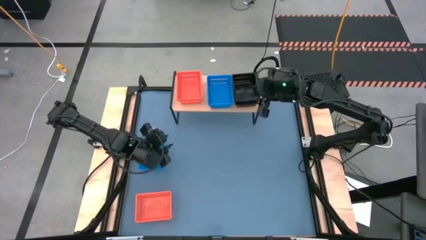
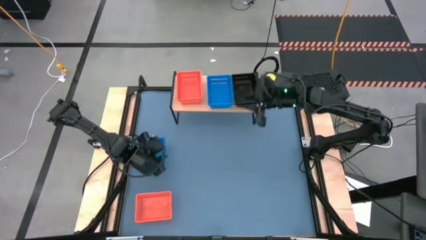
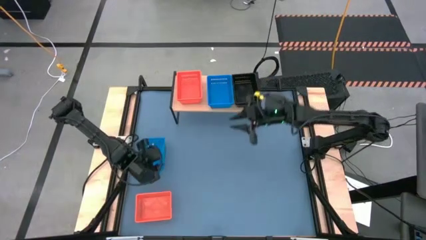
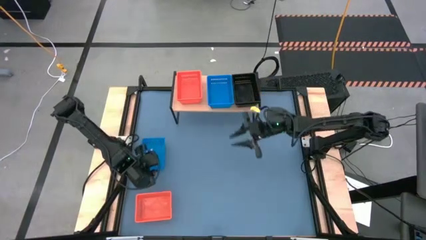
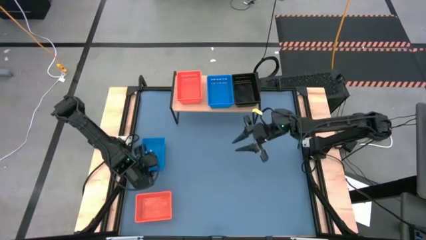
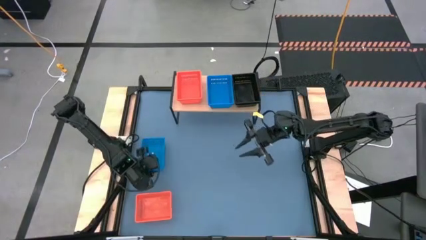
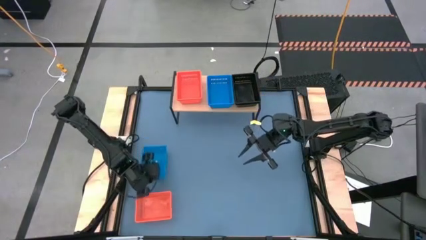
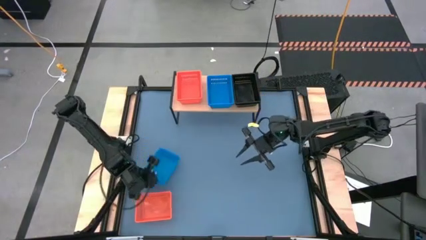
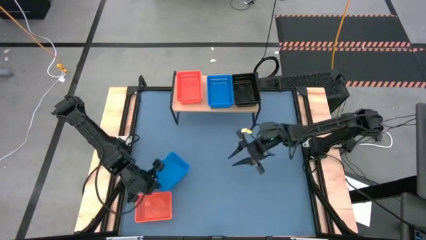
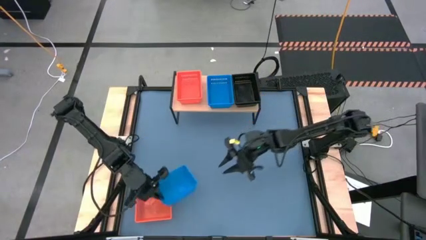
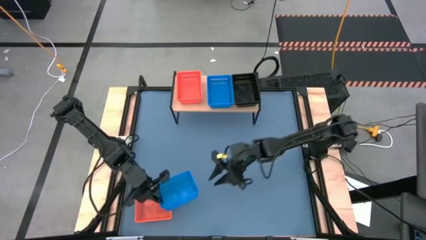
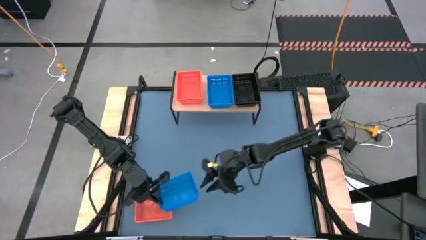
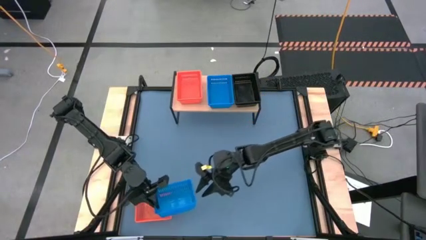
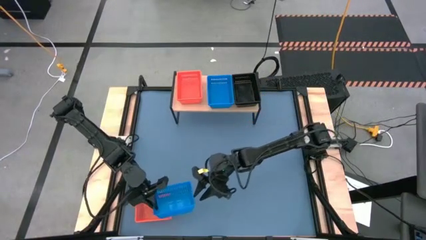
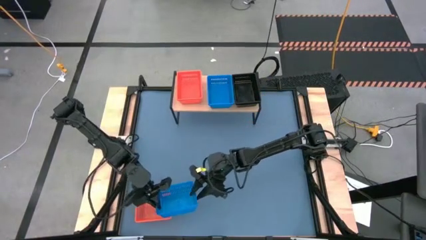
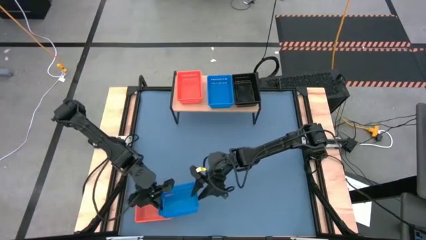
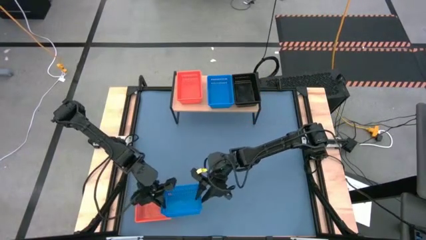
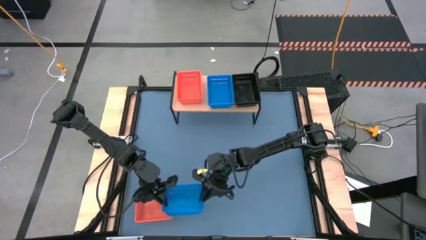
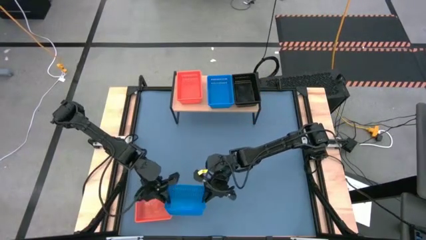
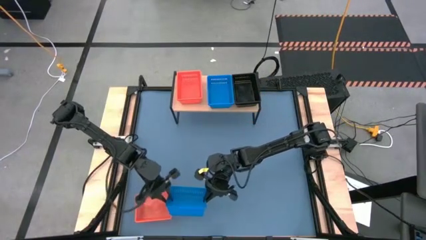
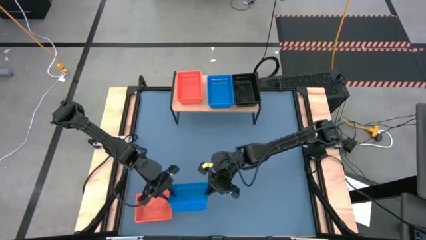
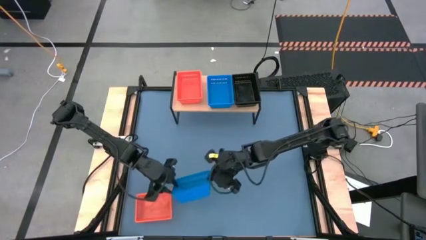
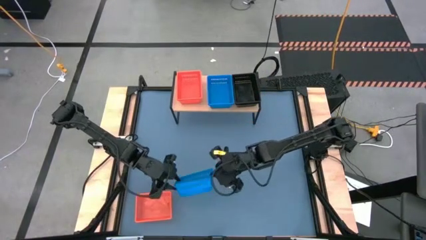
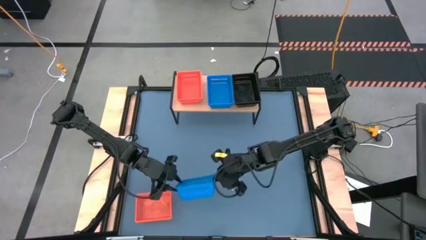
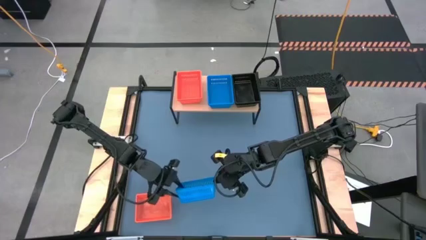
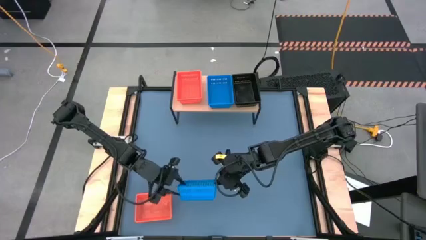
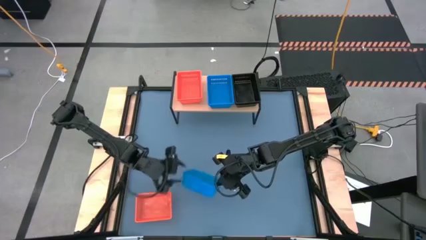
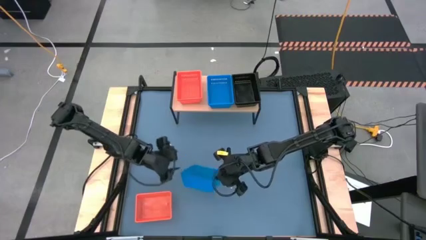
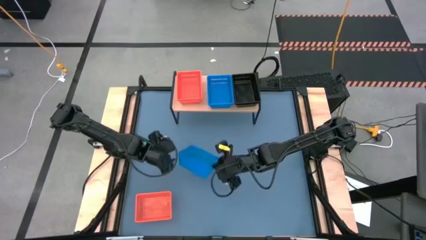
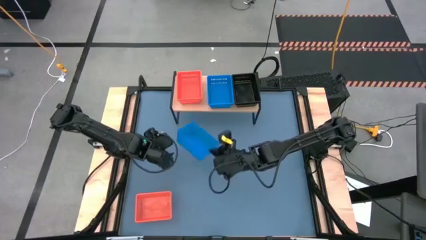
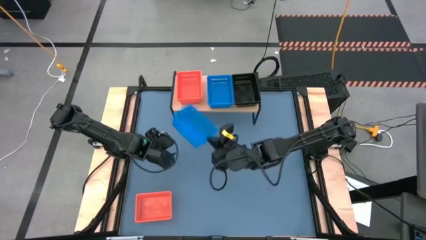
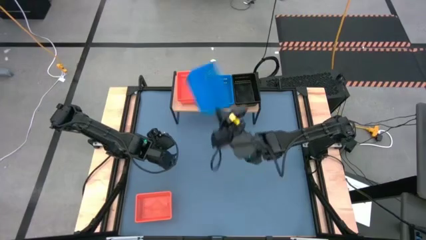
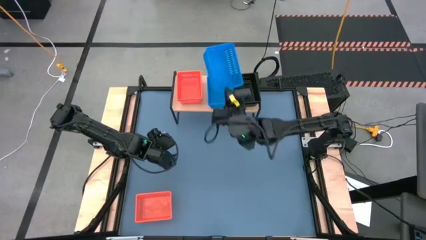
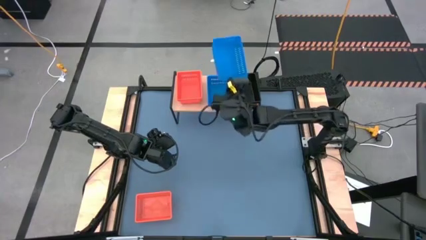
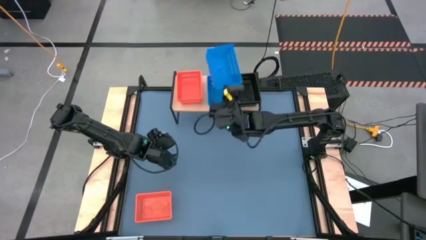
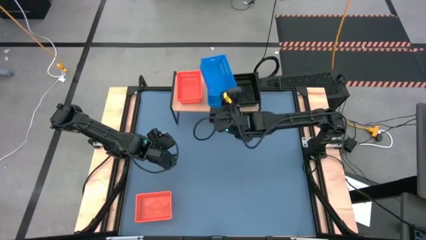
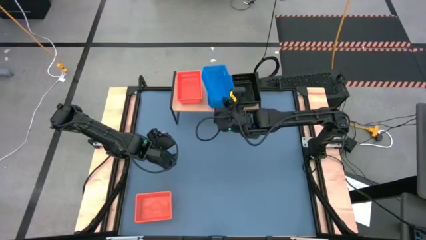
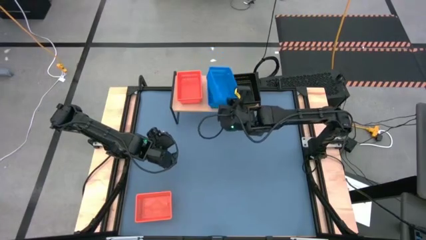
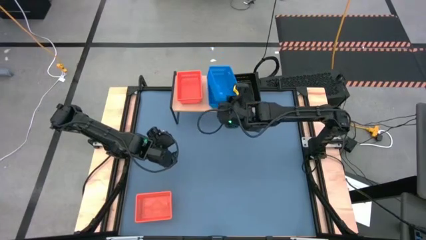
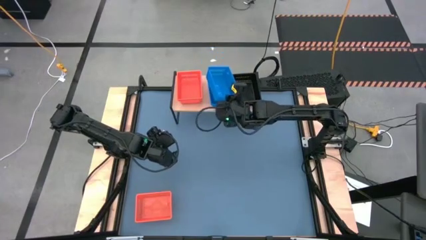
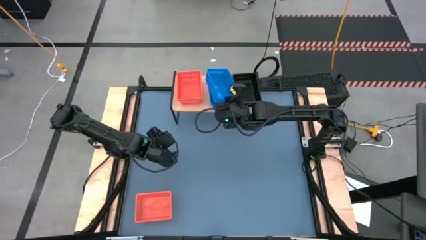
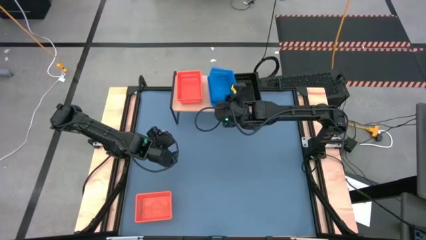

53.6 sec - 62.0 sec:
Task: Stack baskets on shelf by color
Stack the blue basket on top of the blue basket on the shelf

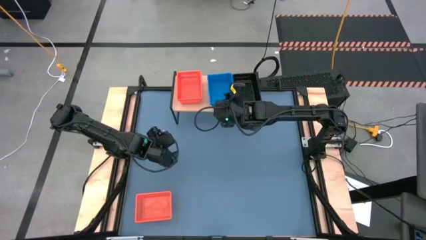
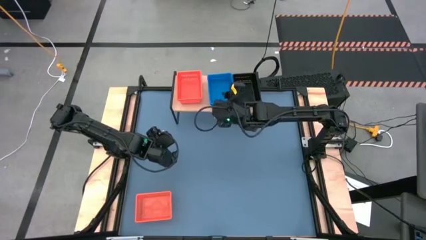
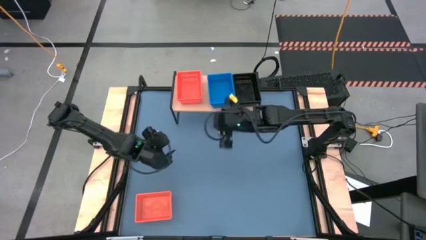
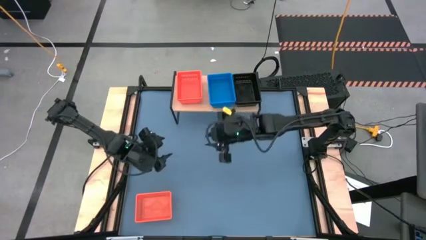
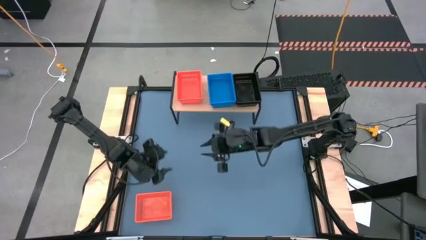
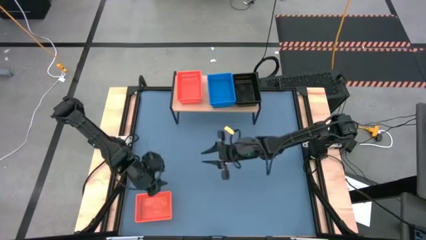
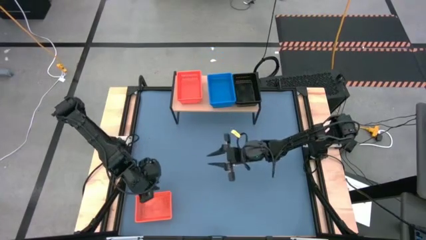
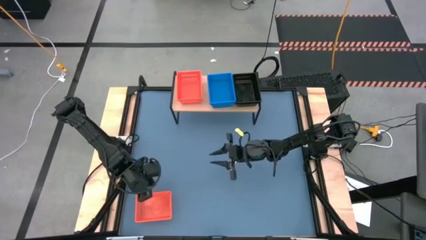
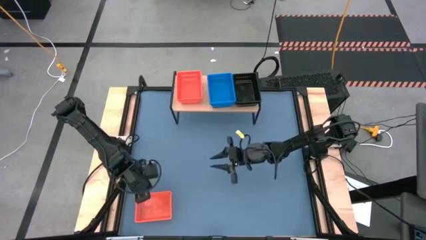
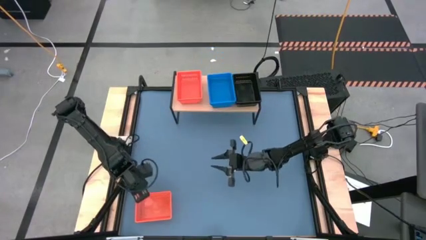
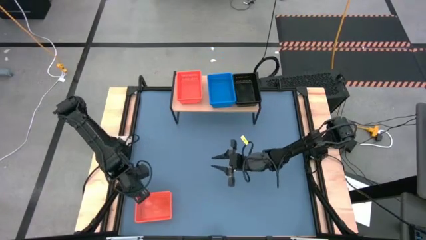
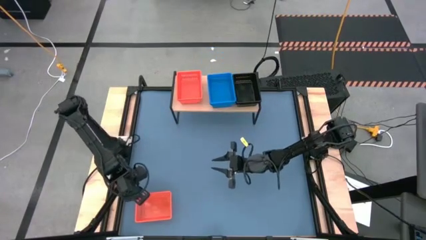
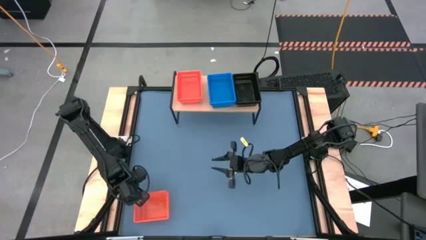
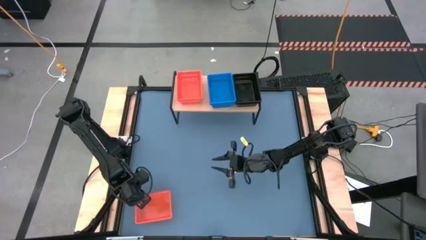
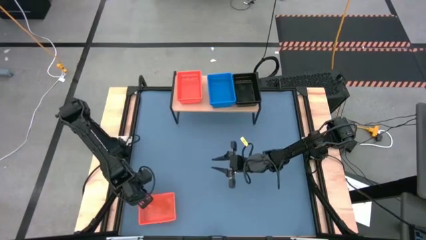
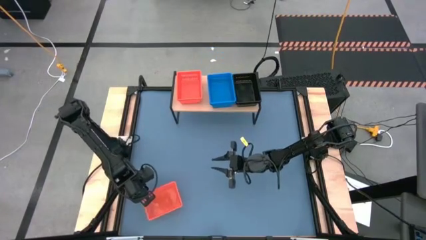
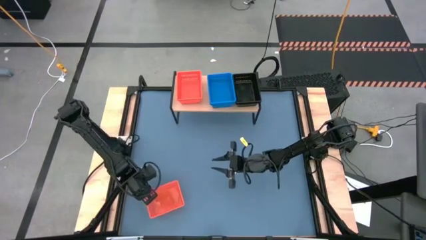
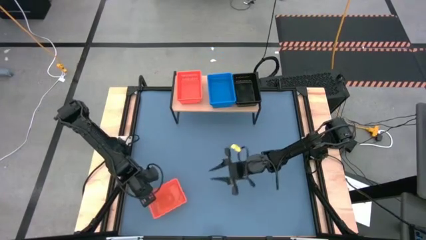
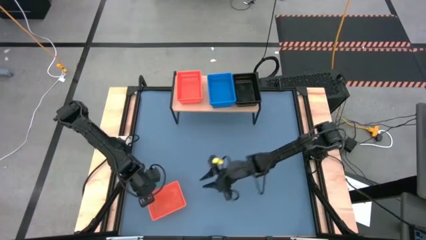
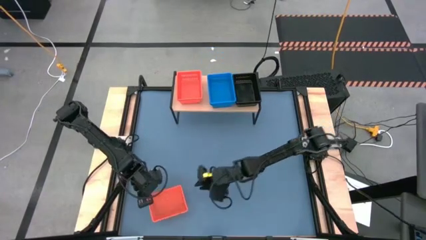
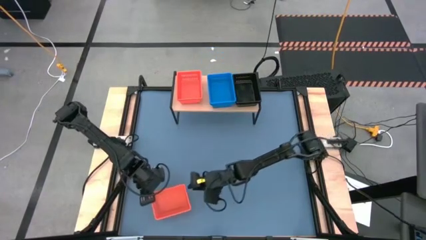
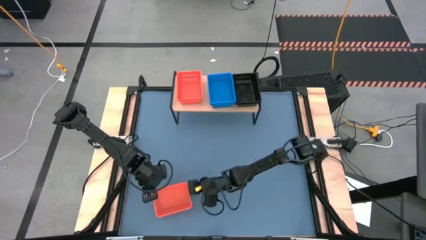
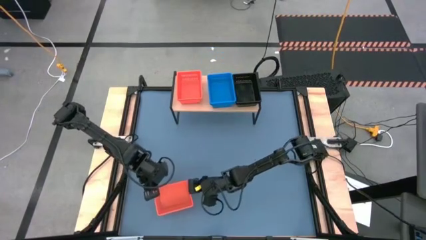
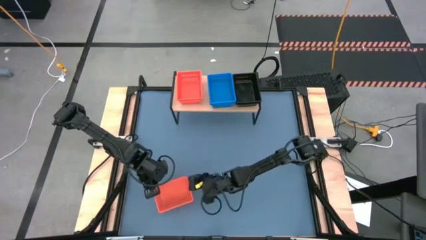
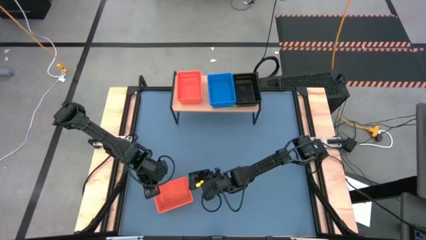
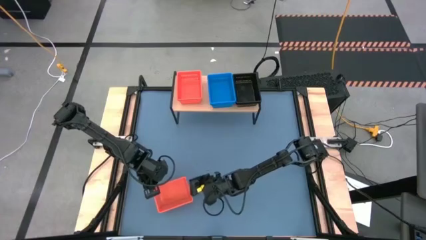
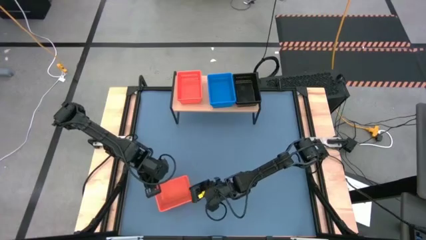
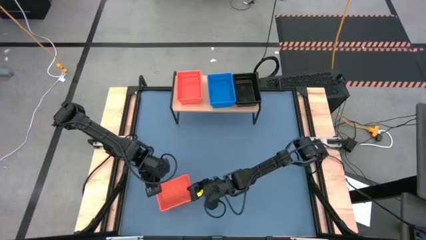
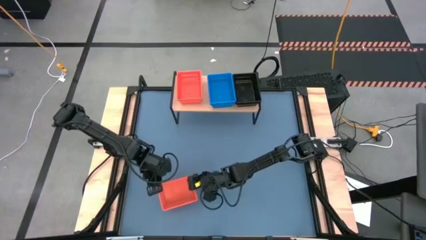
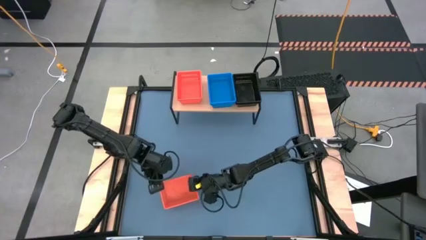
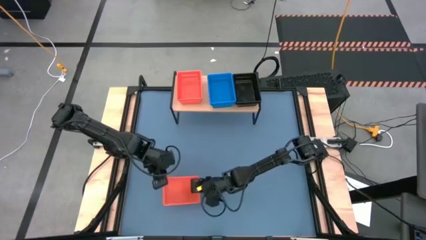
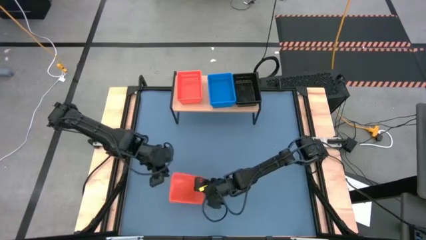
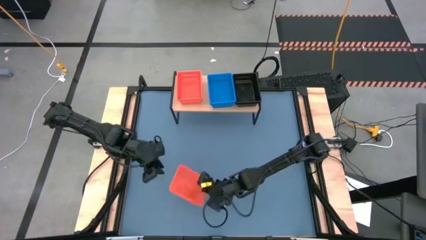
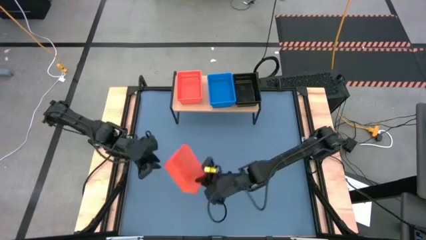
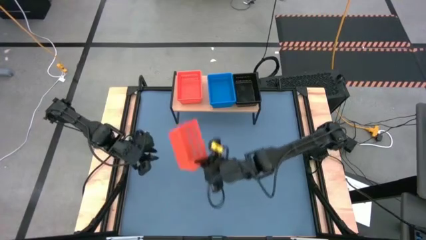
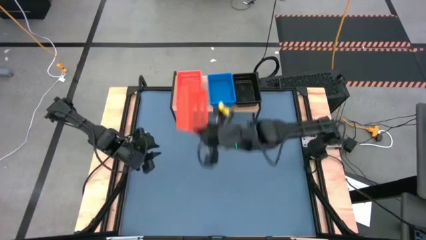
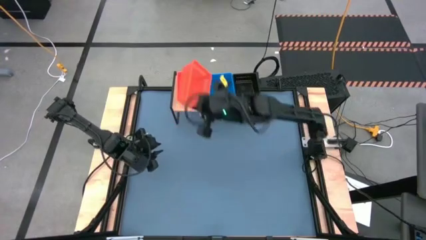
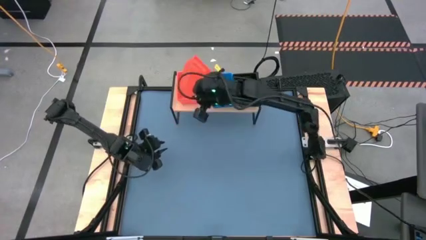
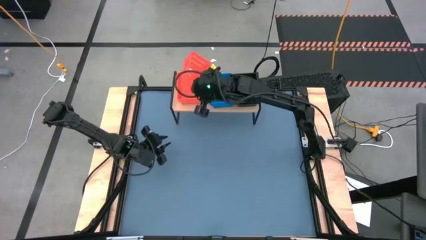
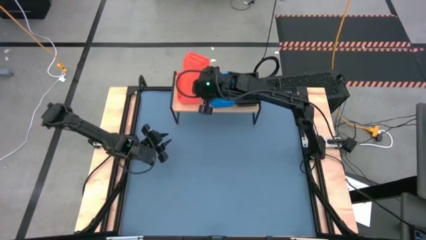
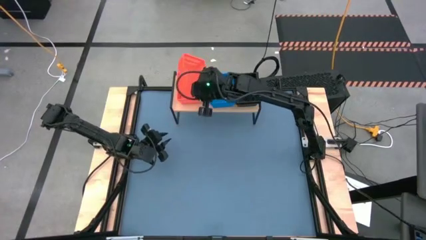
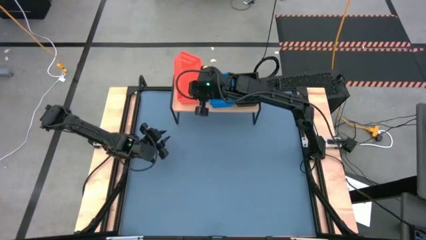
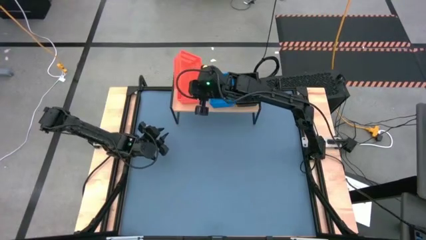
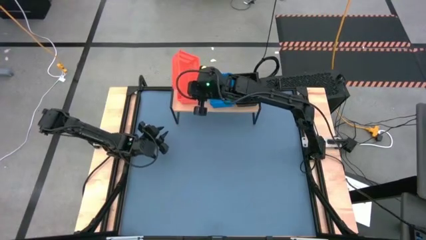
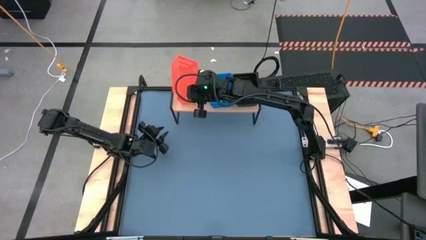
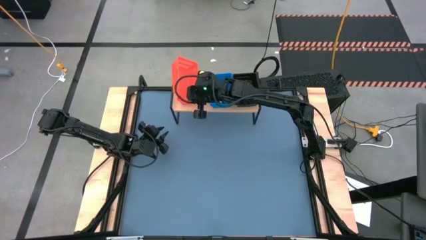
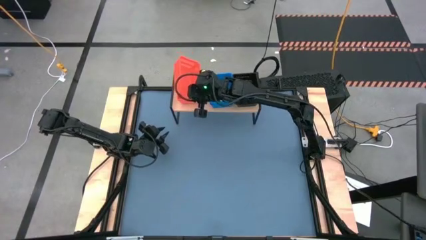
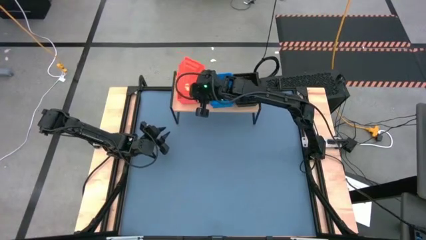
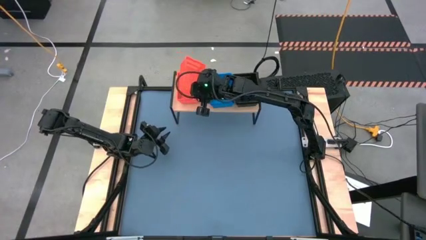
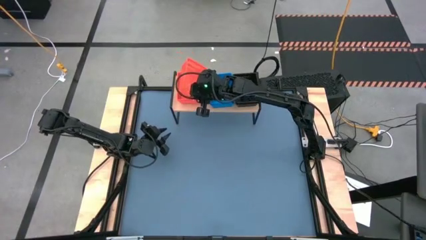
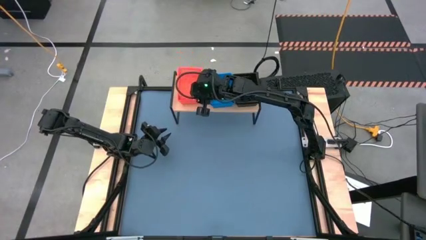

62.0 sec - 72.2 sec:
Stack the orange basket on top of the orange basket on the shelf
